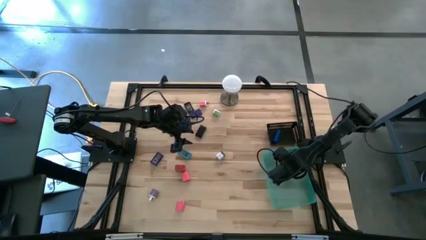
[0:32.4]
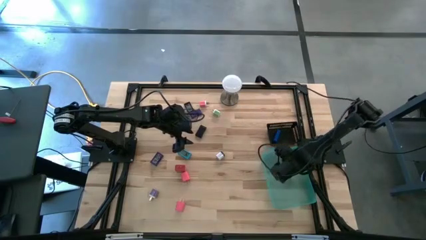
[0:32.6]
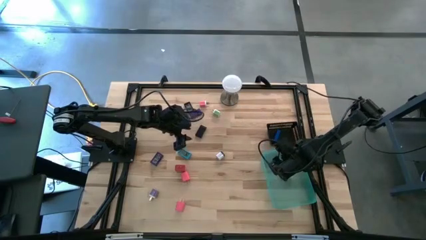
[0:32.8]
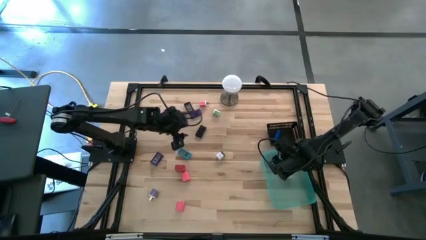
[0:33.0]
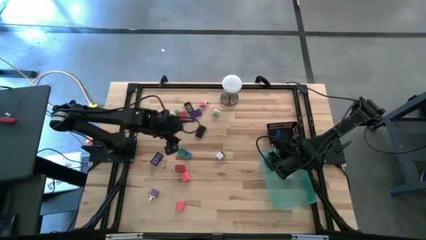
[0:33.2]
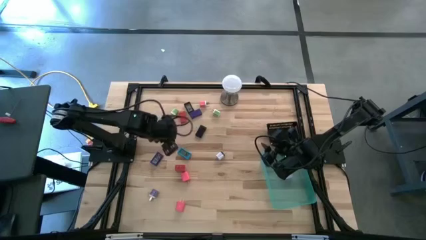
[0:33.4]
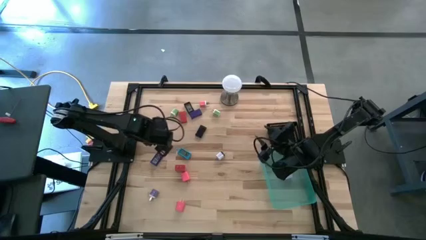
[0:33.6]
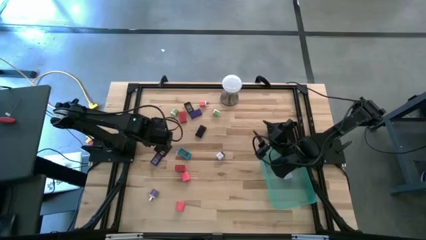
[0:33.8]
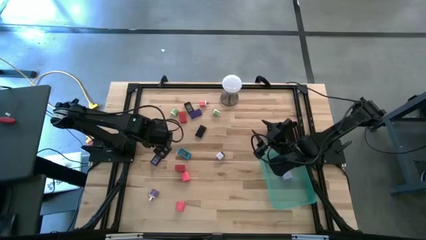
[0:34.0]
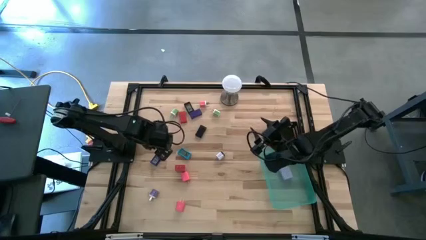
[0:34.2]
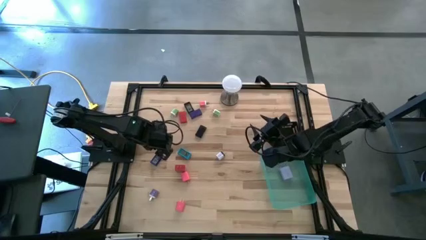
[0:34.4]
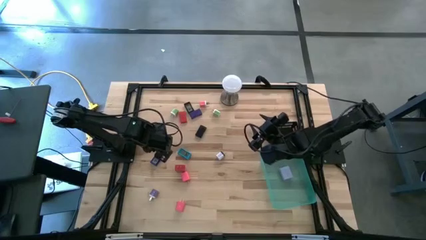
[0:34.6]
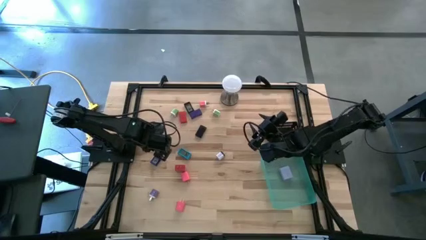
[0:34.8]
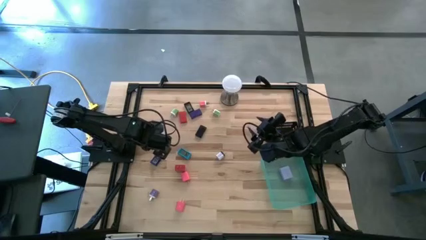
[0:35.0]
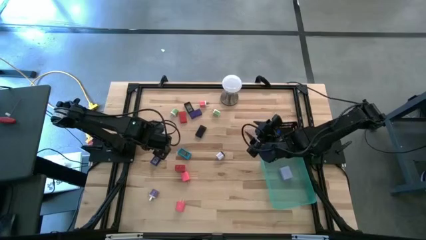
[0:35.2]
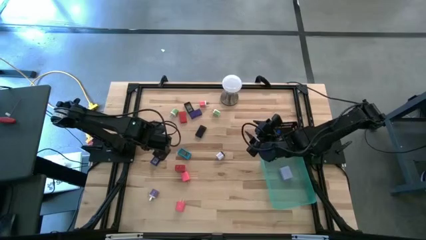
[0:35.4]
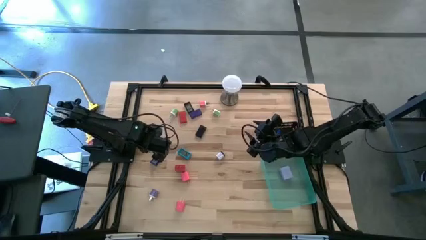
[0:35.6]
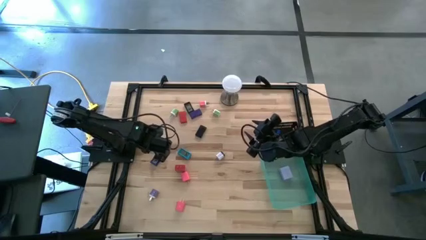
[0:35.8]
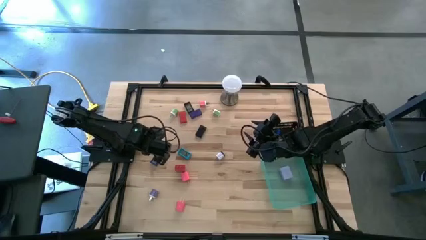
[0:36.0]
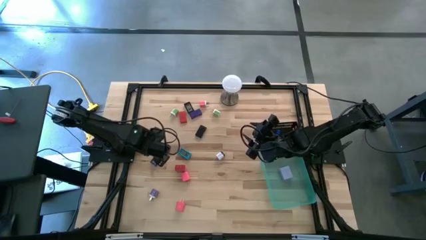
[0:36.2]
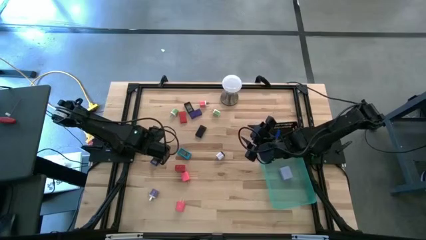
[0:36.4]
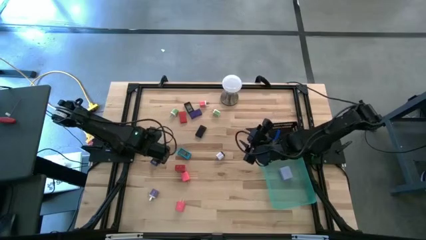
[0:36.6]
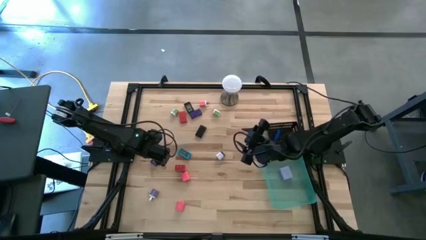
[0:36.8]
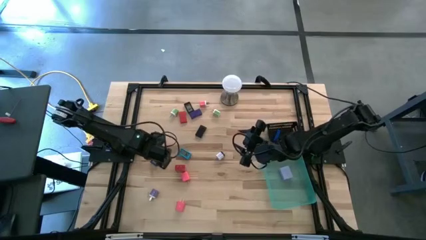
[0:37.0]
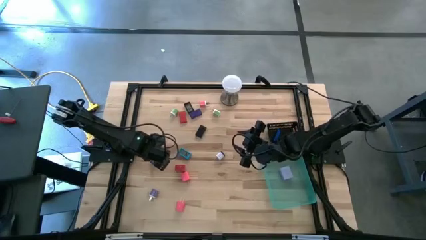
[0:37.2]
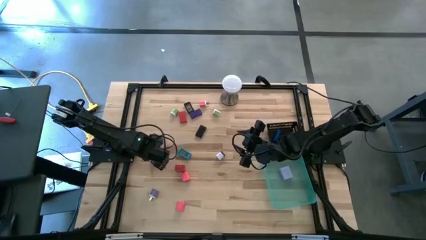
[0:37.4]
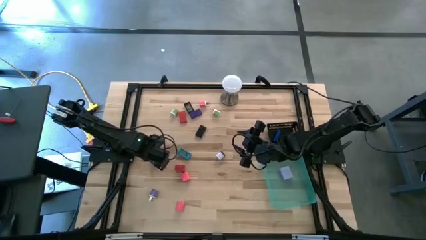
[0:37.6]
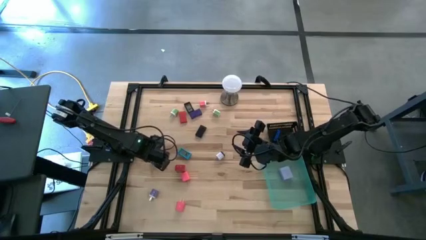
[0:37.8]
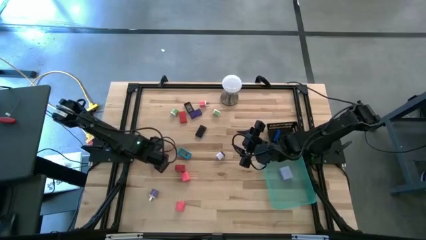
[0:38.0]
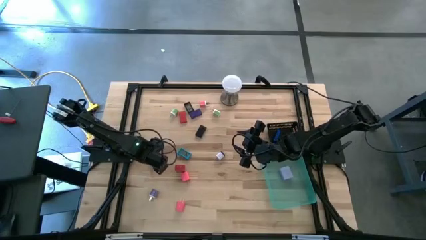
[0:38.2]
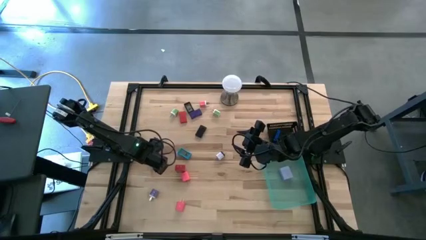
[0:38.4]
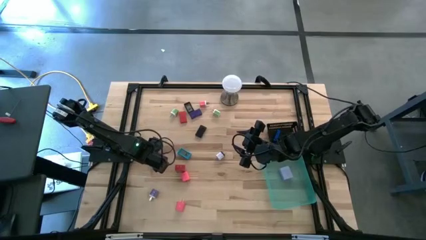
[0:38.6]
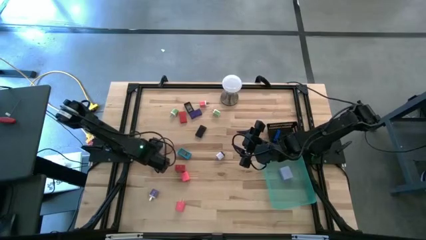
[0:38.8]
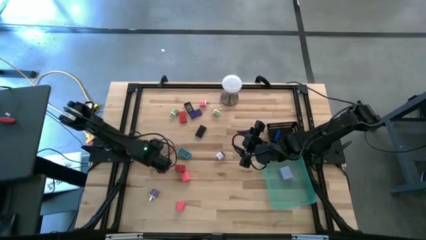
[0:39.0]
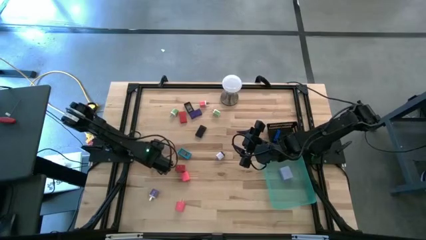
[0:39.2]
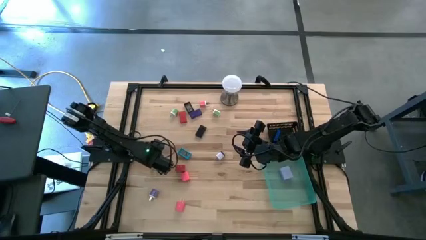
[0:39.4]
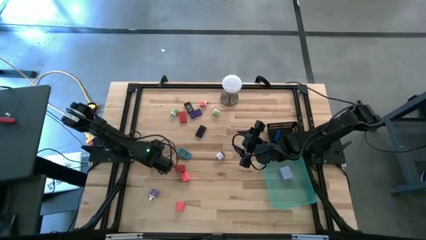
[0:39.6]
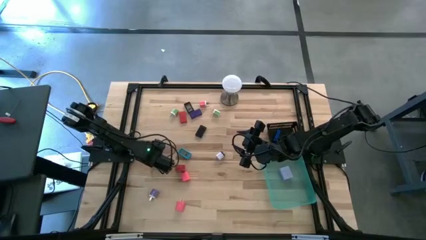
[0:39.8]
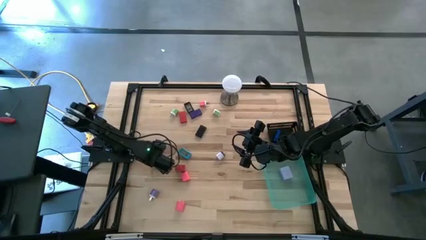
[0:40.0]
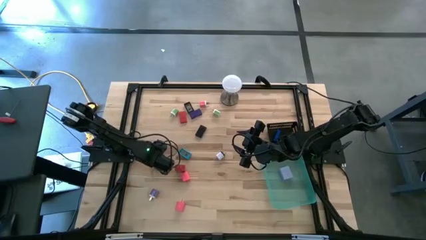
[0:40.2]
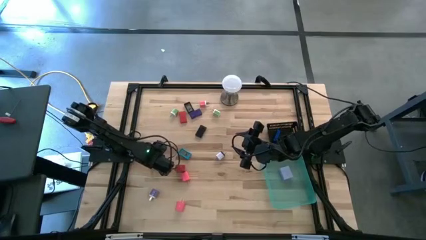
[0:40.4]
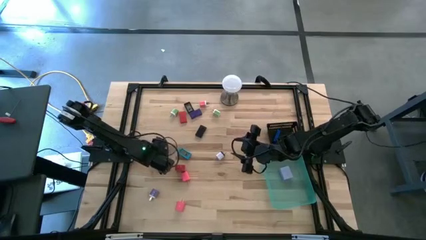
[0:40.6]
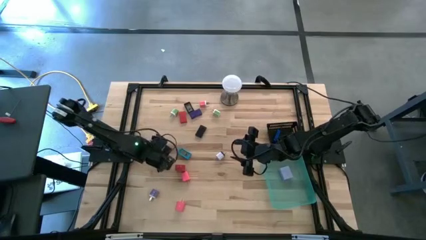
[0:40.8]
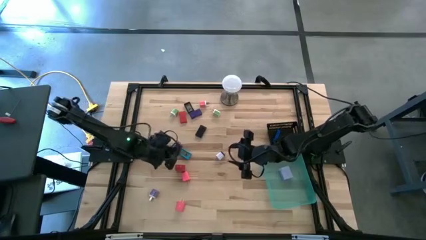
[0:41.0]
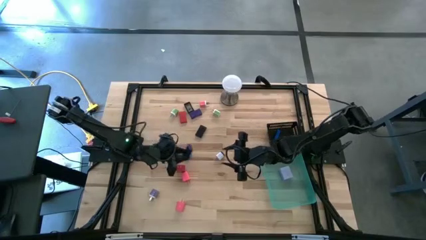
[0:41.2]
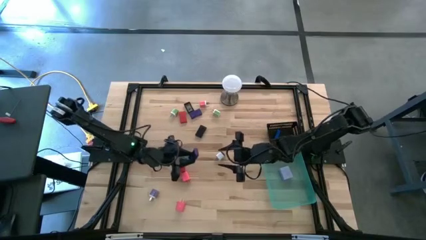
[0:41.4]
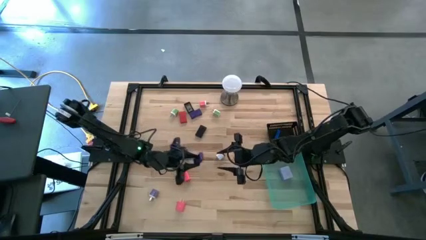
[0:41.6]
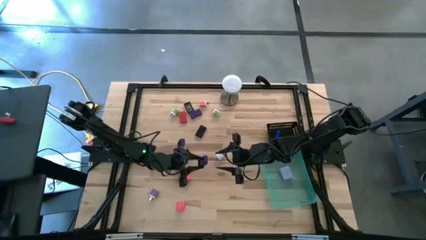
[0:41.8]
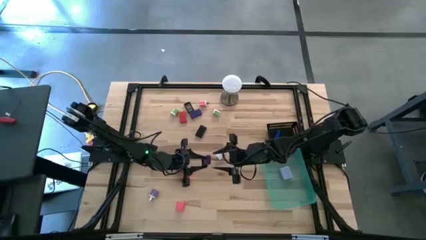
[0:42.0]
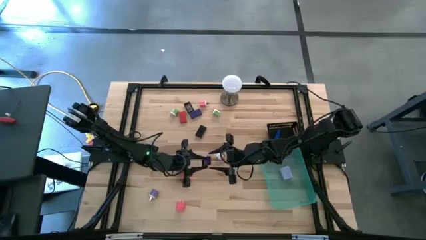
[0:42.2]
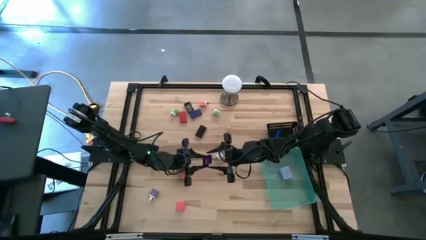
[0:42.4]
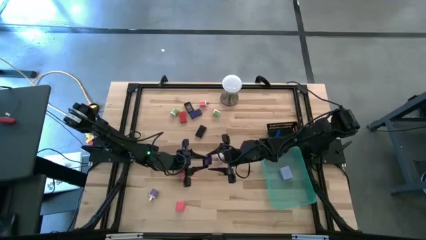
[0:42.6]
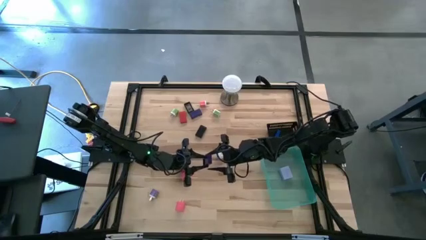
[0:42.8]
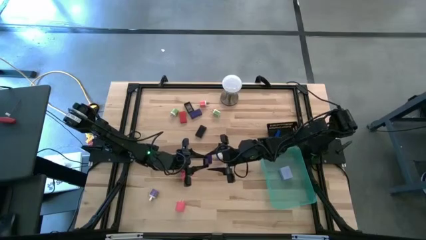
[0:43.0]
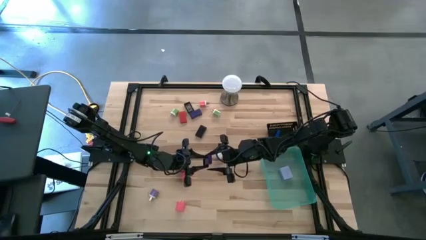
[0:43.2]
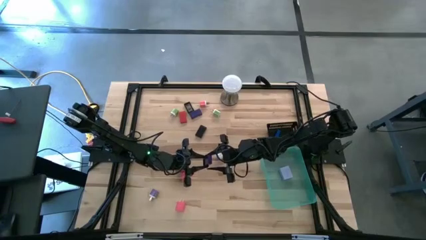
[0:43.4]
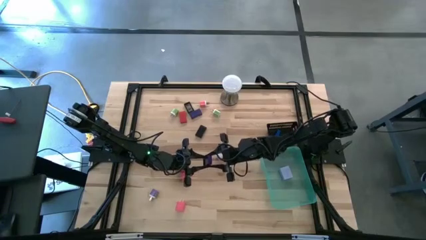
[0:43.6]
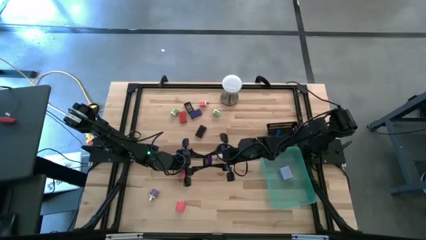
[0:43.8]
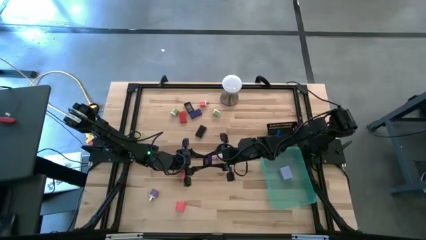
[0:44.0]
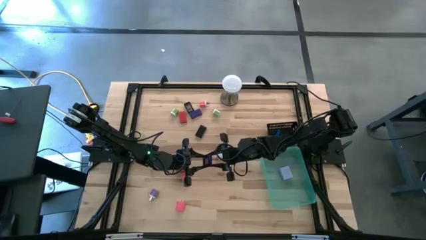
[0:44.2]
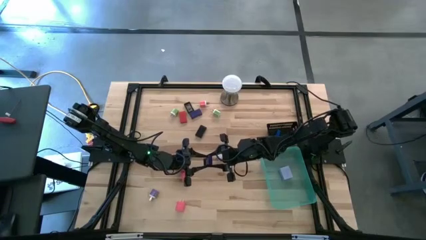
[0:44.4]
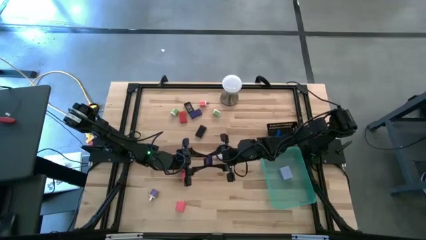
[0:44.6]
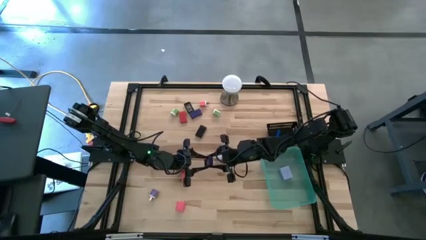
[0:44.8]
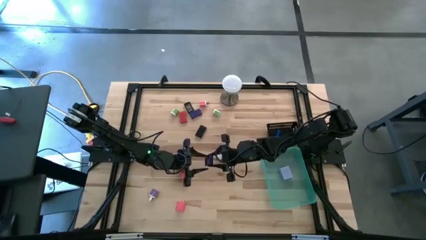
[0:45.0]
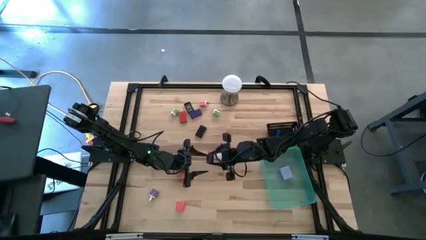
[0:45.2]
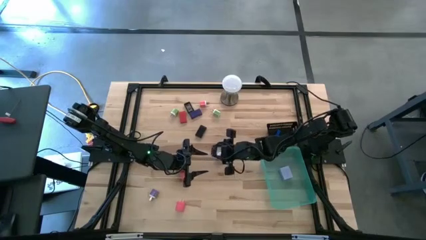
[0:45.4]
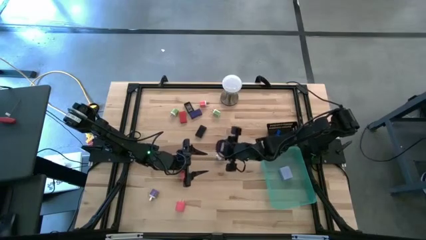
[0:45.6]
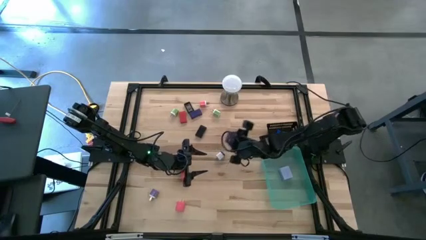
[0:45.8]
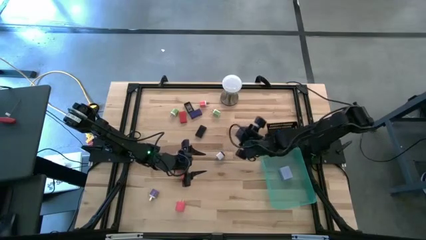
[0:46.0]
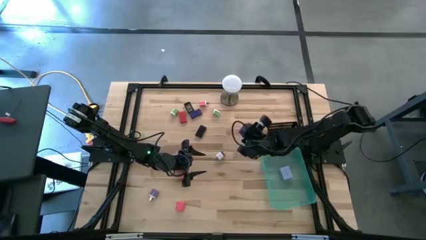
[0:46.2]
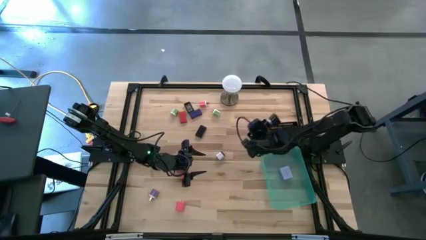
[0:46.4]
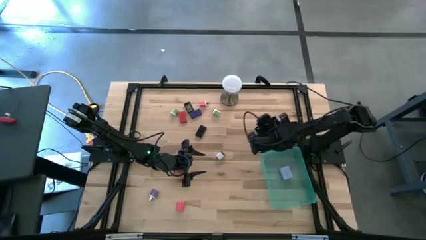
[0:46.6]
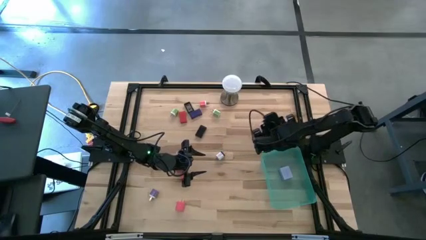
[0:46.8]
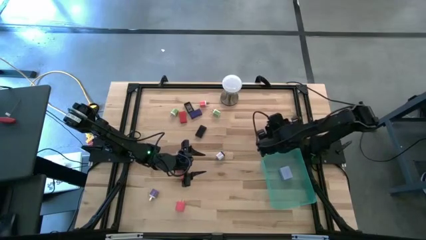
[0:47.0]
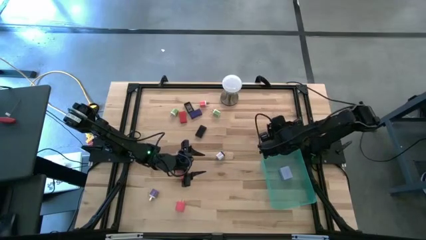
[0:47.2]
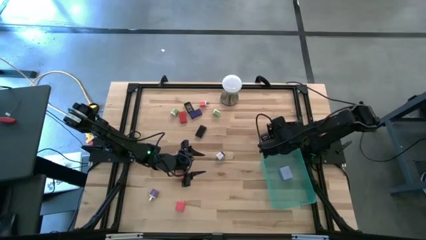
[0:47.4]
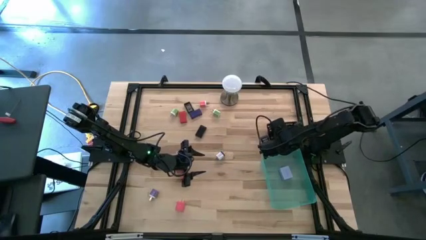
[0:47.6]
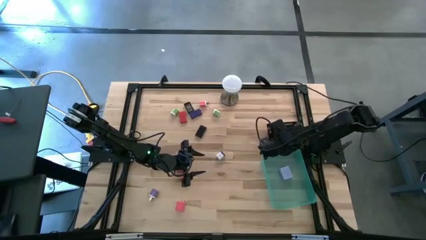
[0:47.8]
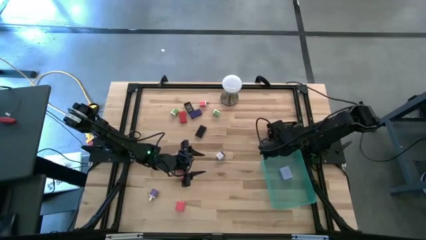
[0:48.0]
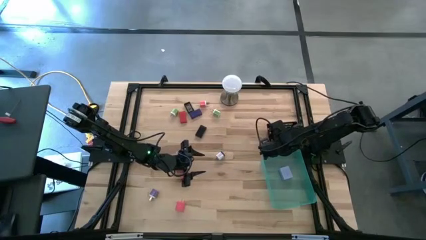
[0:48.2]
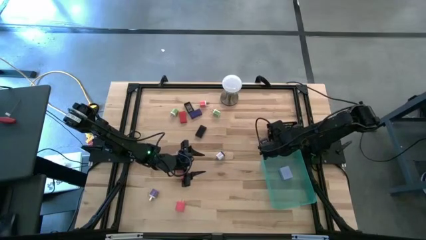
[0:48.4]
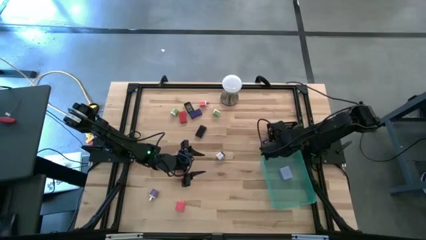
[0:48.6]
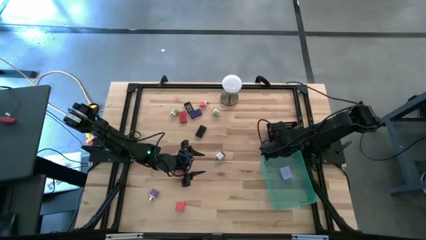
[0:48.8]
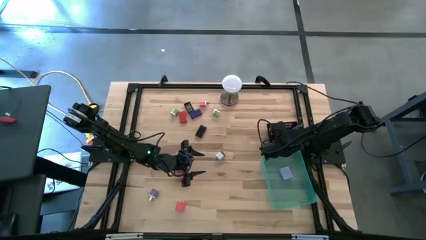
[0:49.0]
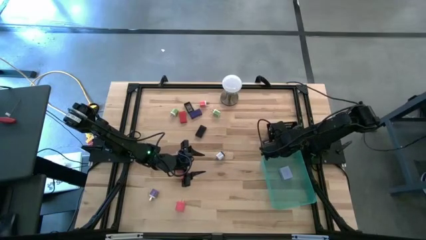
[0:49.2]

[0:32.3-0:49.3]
Task: Pick & Place Office items
Put the violet digital clock into the black basket
